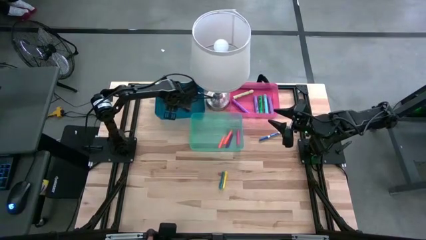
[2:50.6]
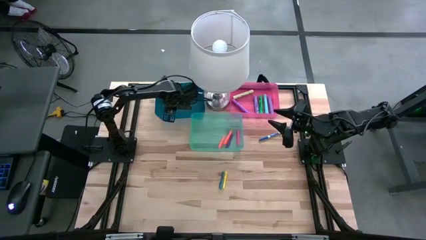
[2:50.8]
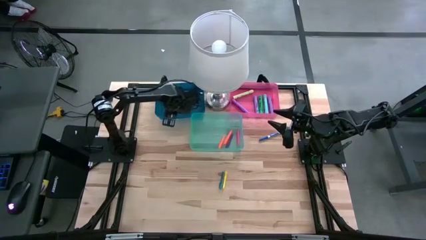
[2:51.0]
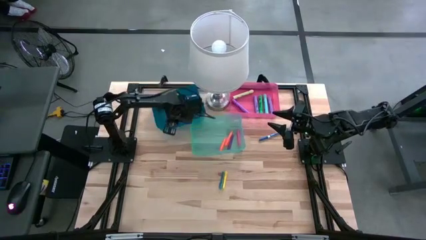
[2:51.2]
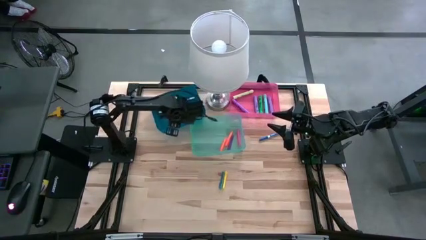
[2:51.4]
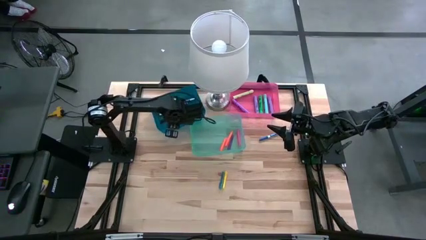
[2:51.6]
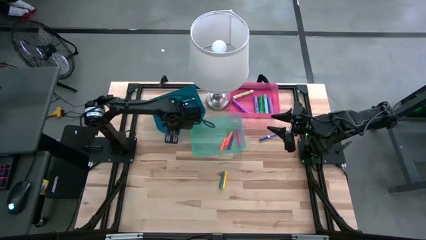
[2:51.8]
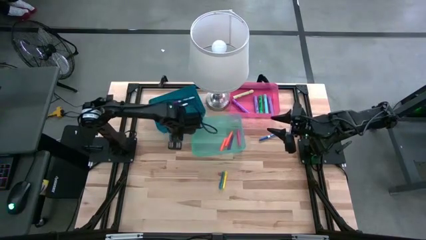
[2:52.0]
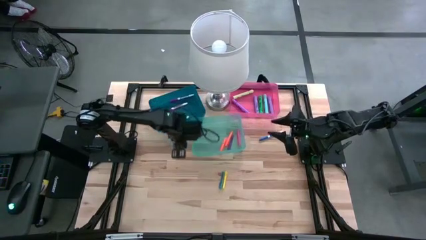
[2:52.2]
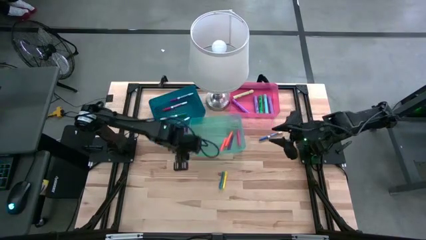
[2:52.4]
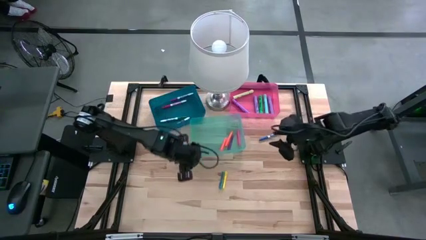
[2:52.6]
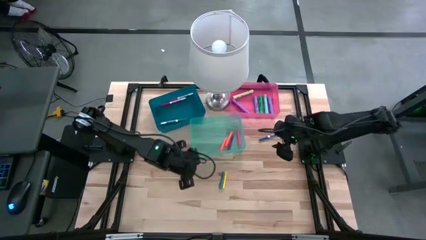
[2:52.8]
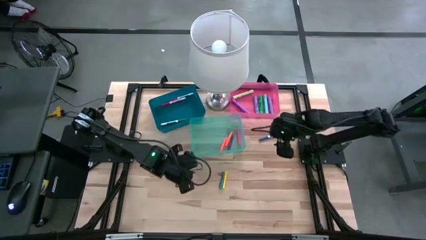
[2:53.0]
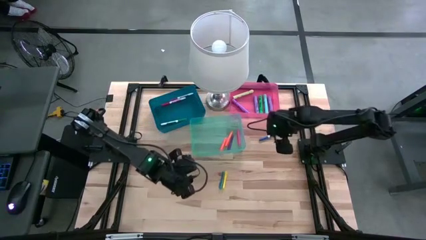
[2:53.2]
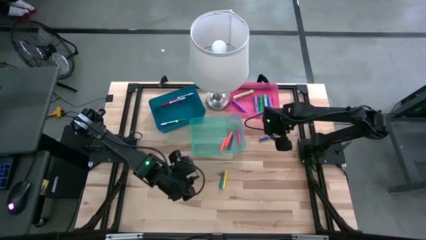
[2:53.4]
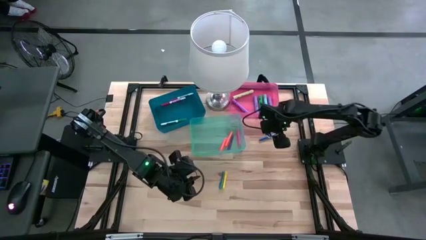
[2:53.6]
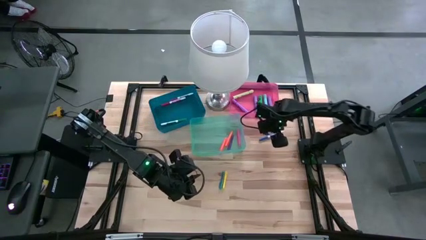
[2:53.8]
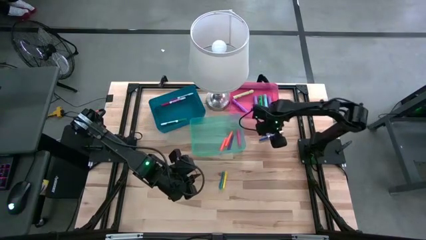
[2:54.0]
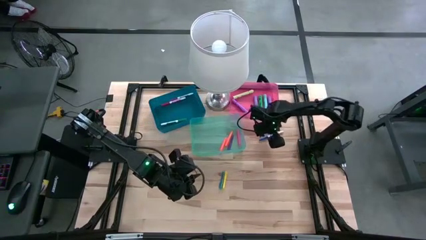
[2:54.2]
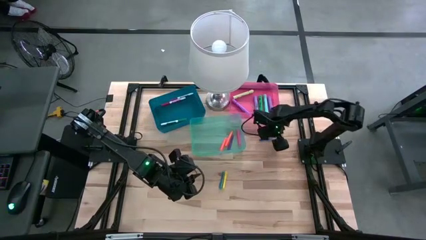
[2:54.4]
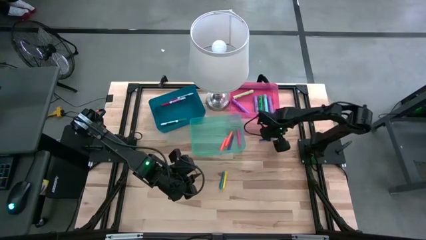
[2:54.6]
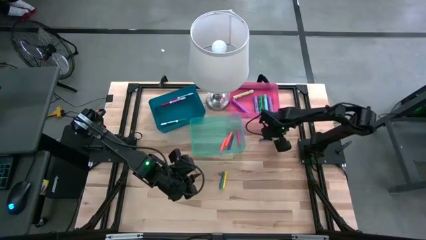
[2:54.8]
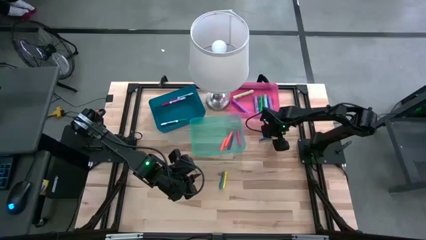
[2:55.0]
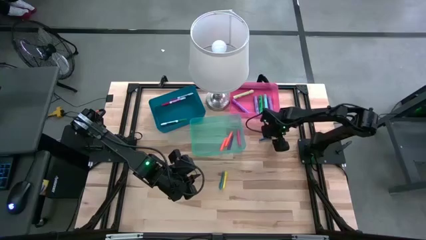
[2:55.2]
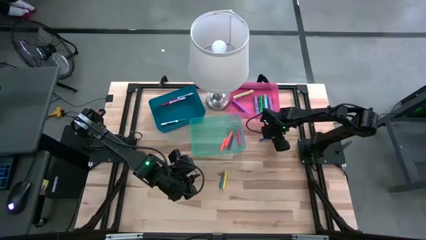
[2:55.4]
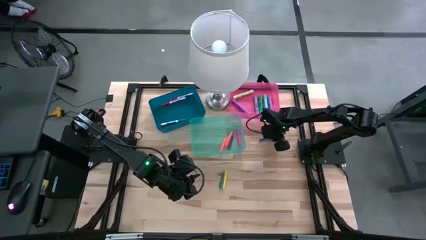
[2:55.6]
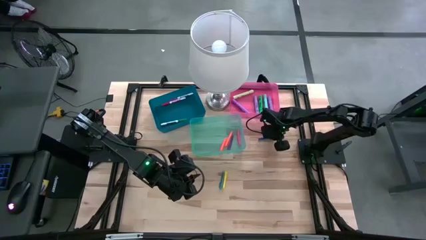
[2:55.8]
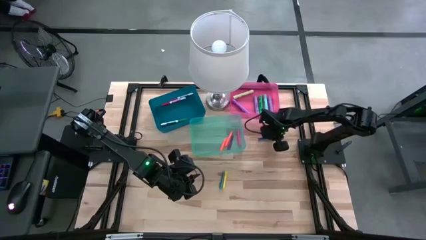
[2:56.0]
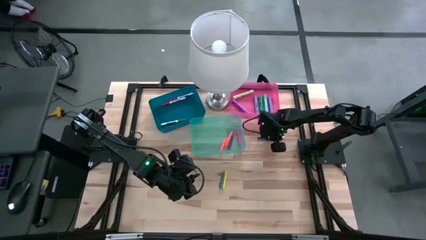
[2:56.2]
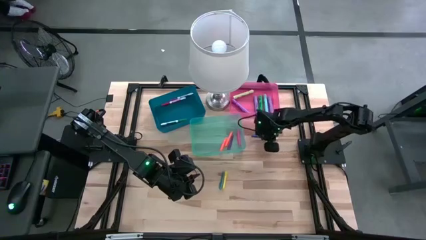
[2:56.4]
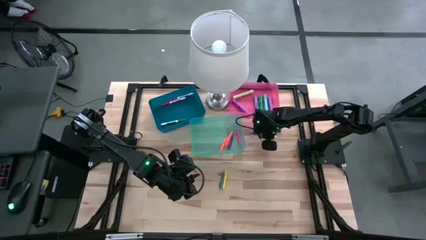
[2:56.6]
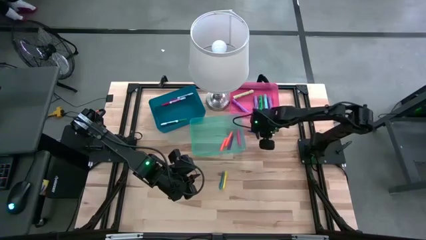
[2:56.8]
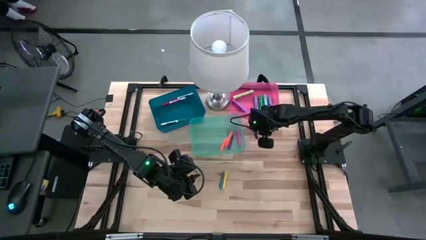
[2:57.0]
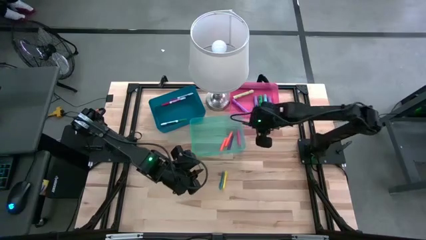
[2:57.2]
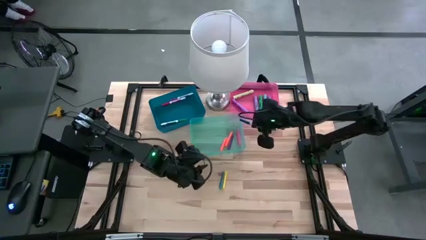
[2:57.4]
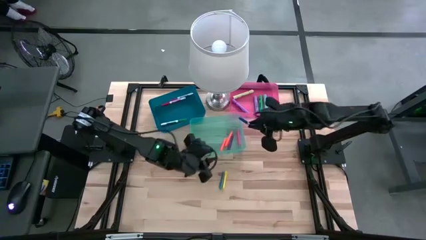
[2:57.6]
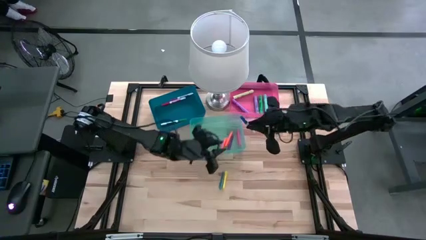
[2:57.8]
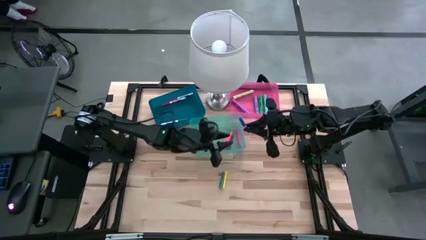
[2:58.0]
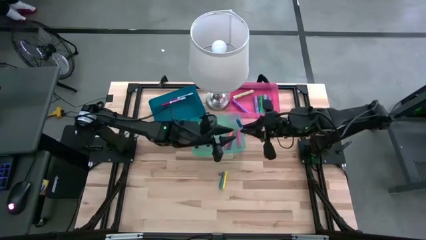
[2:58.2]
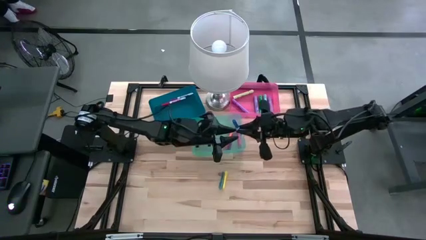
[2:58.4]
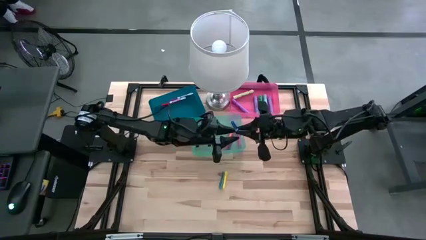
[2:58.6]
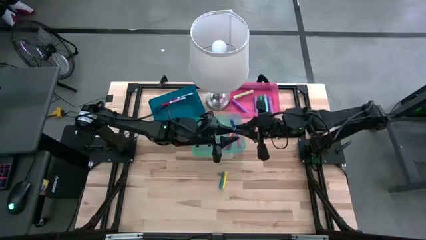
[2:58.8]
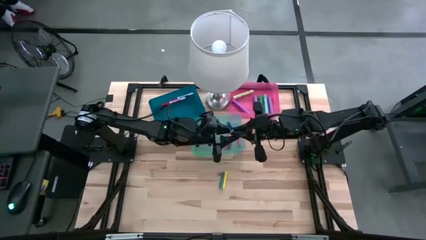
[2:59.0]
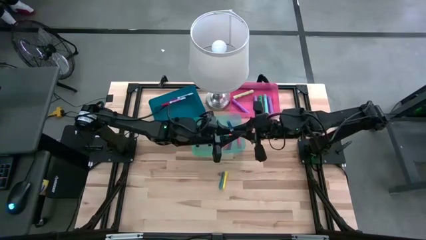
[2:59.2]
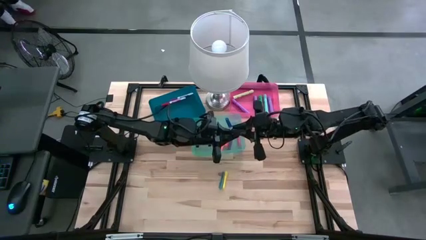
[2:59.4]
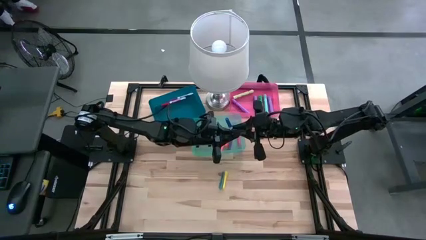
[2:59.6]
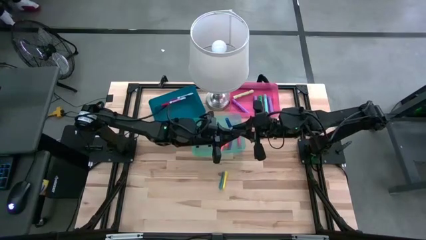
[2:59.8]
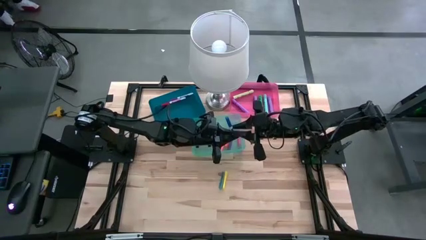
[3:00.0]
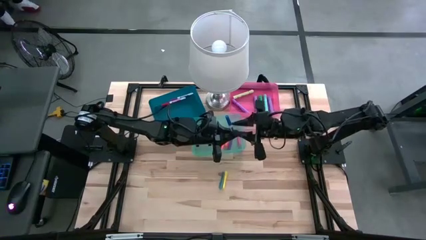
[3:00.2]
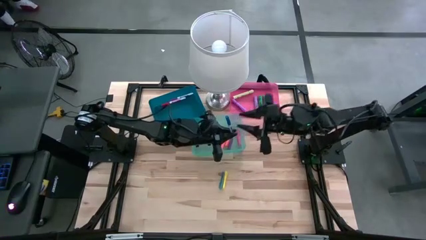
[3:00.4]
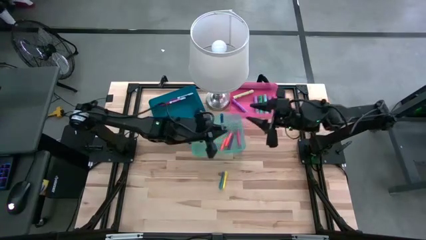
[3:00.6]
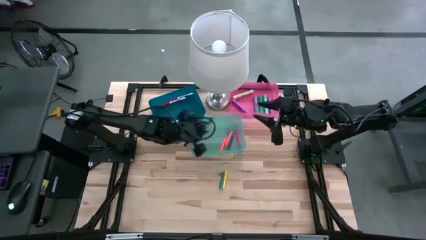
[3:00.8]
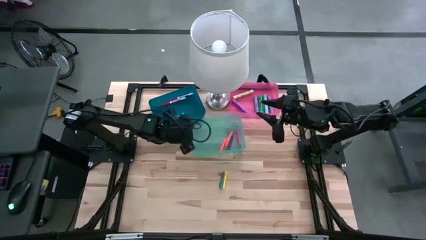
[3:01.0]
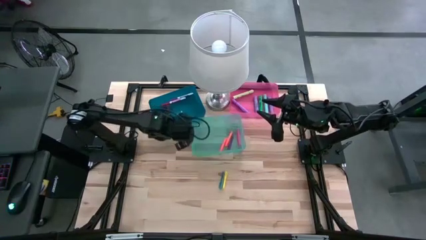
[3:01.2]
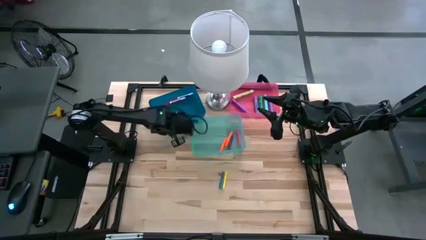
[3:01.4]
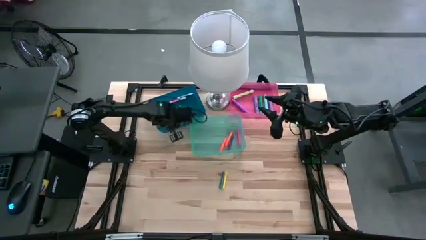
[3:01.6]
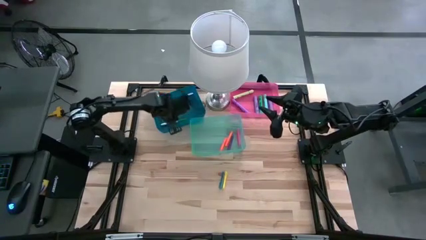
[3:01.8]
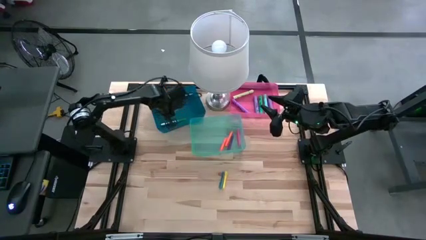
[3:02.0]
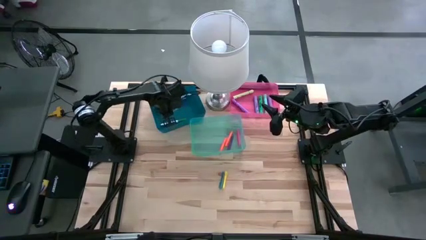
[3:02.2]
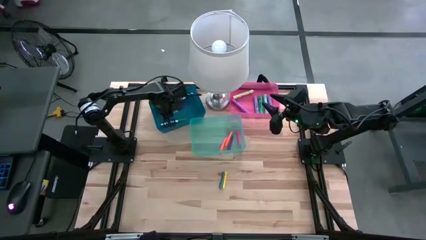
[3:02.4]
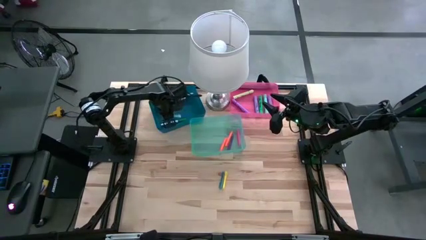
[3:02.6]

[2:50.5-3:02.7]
Task: Pick & Place Markers
Put the blue marker pen into the blue bin

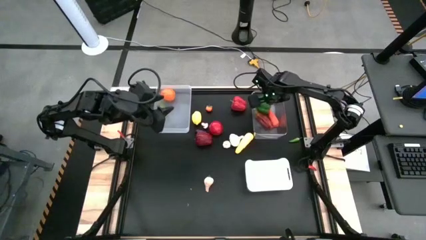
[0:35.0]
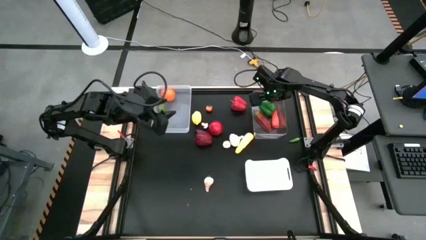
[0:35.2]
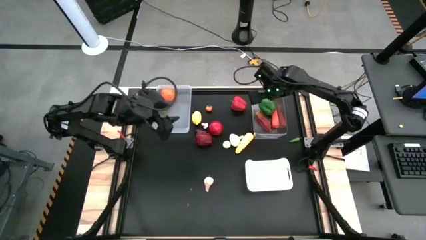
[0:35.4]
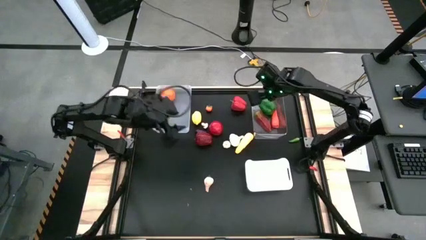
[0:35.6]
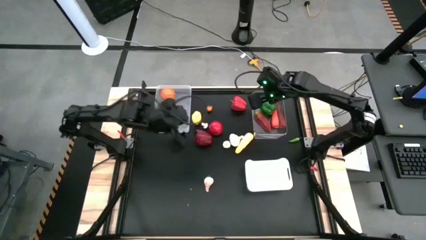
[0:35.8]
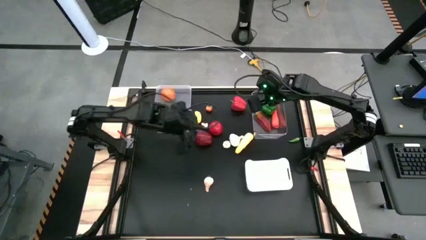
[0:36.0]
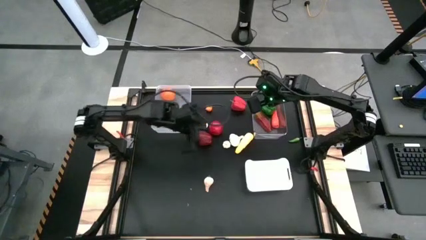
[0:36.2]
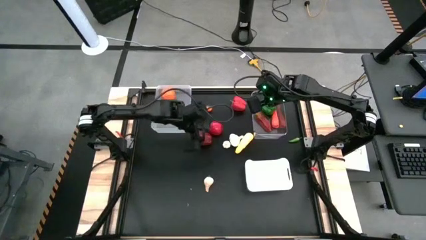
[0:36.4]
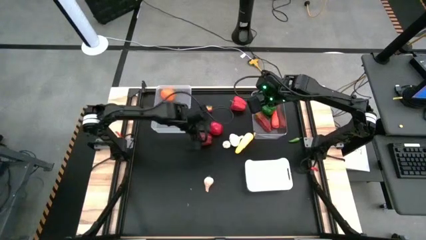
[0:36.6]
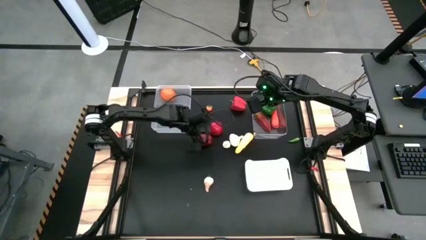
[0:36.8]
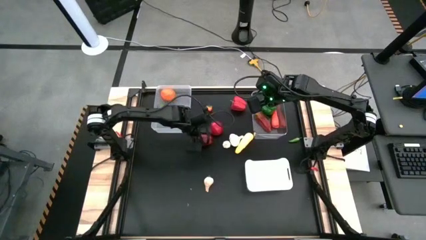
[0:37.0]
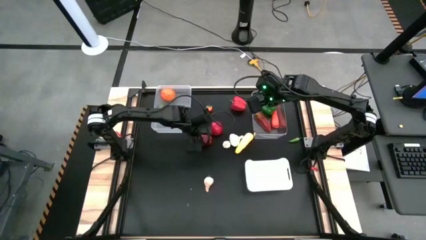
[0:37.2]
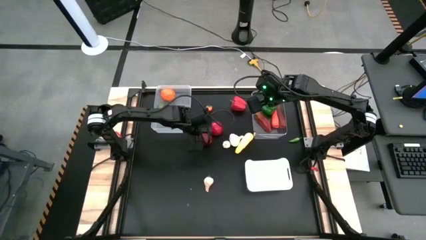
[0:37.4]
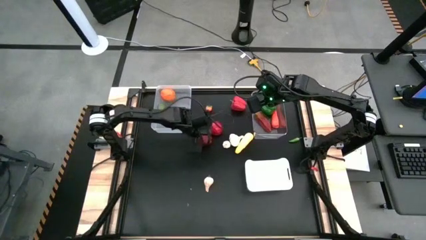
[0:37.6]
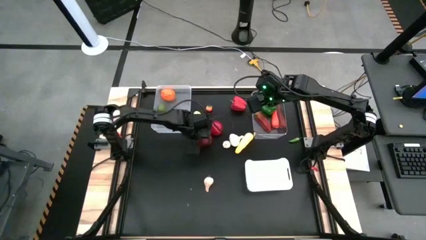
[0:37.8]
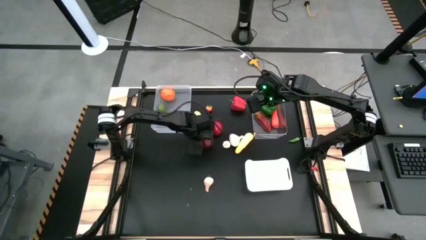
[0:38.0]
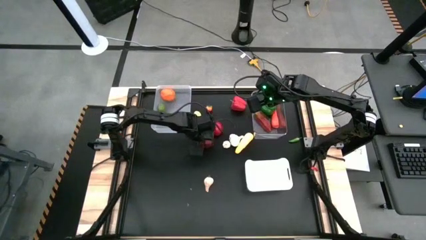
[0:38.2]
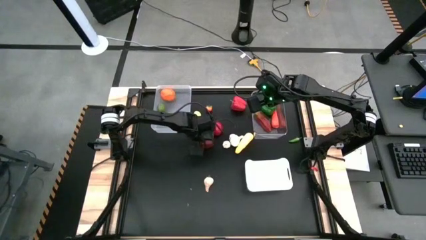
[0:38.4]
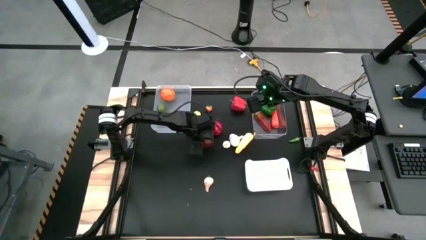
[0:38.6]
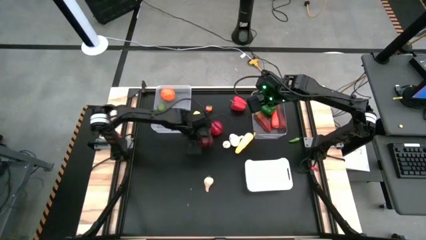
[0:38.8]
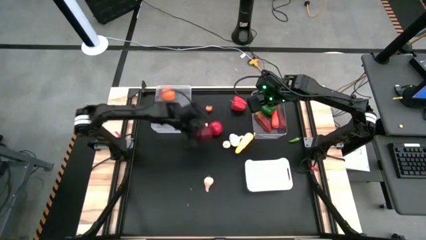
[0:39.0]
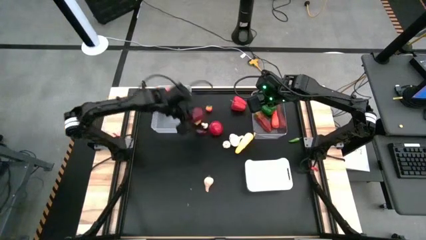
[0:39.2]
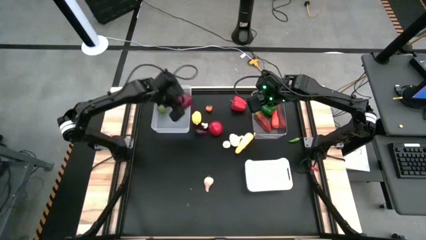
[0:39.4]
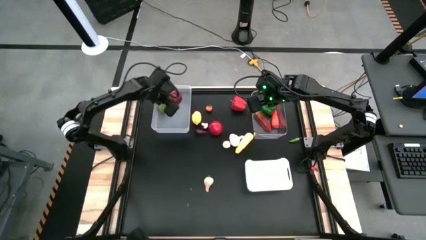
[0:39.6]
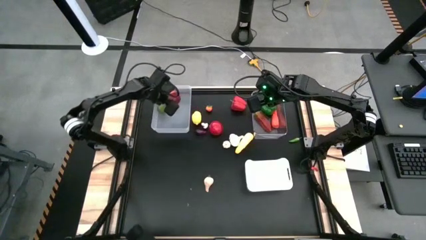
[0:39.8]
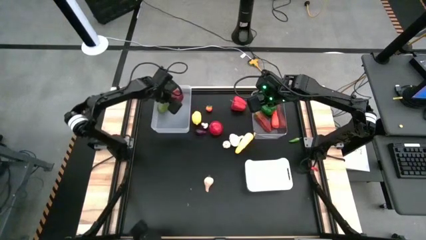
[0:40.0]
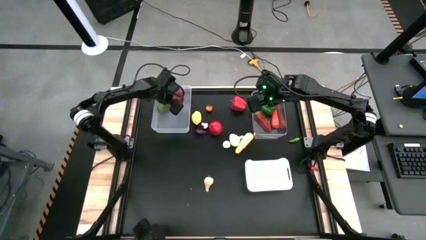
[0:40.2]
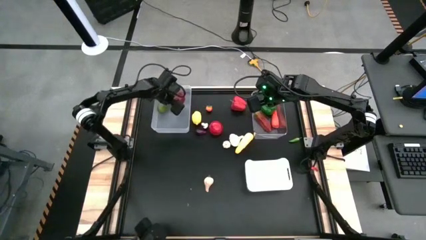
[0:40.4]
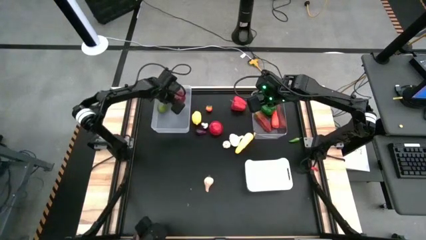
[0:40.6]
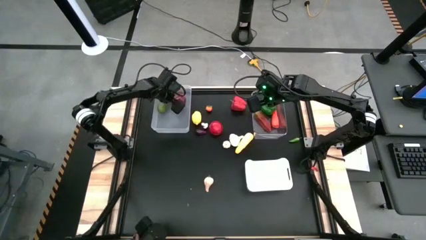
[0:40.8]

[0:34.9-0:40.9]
Task: Sort produce into baskets
Put the red apple into the light white bin
